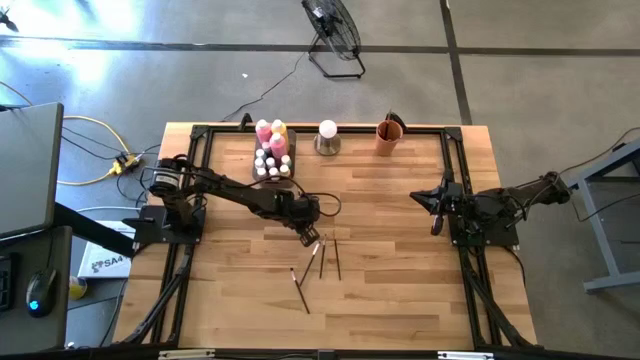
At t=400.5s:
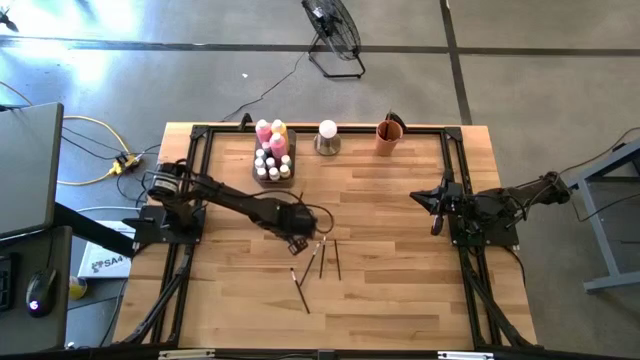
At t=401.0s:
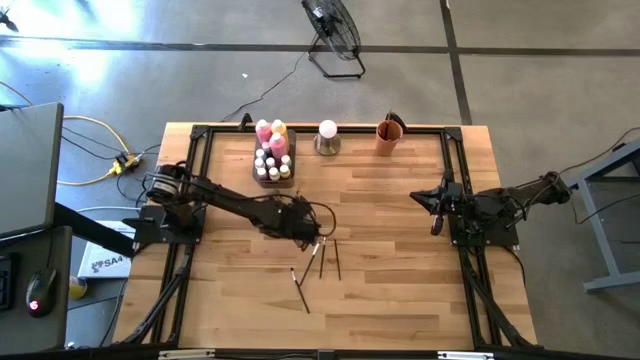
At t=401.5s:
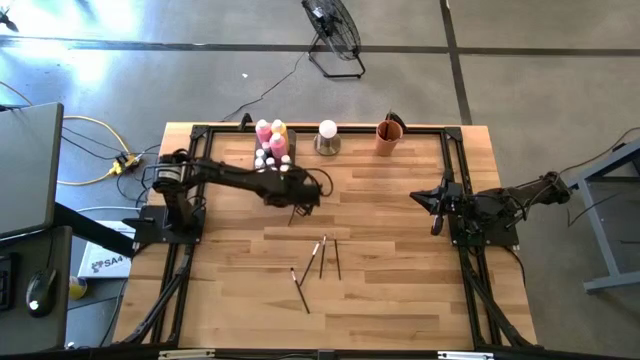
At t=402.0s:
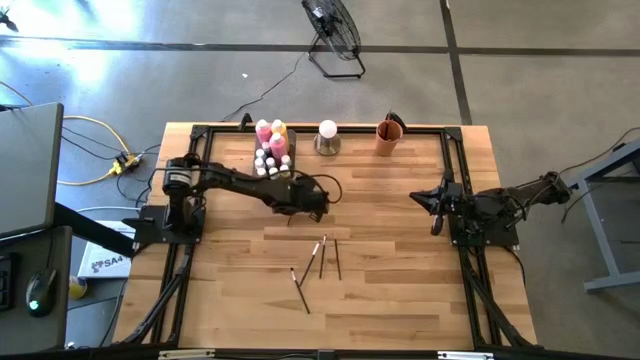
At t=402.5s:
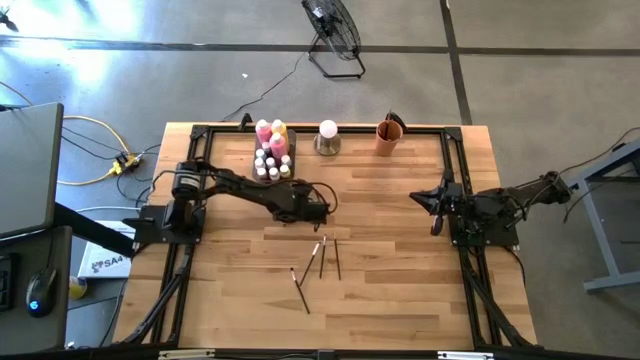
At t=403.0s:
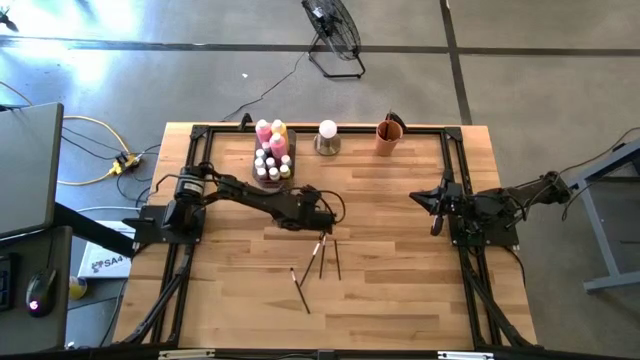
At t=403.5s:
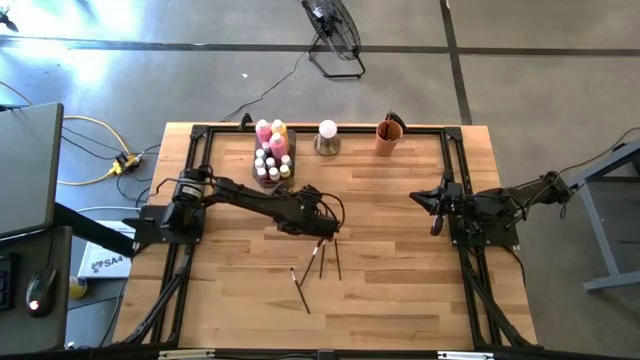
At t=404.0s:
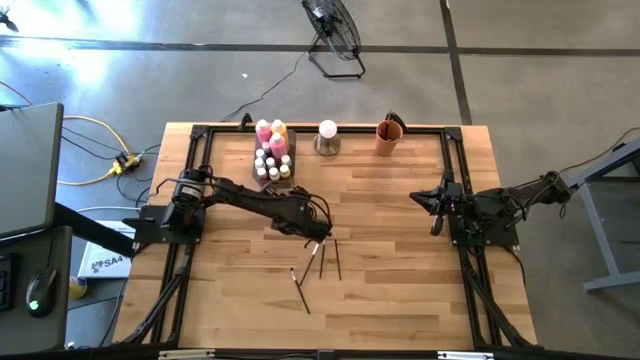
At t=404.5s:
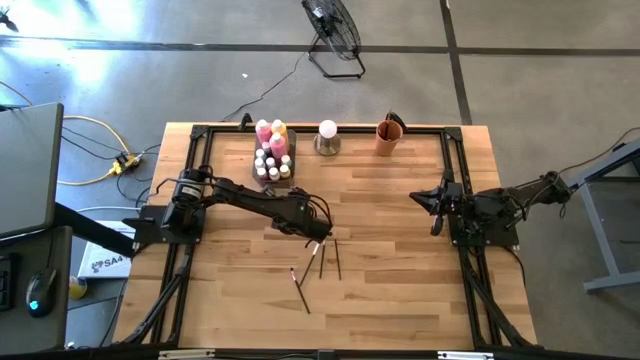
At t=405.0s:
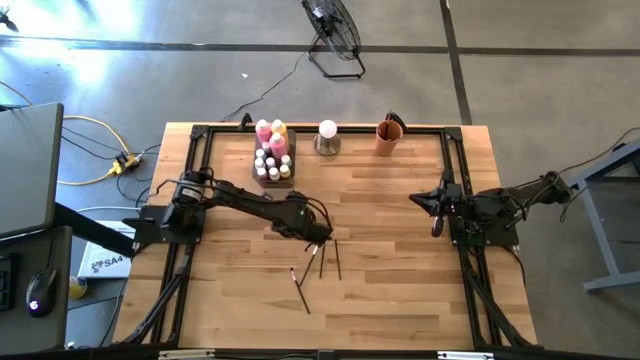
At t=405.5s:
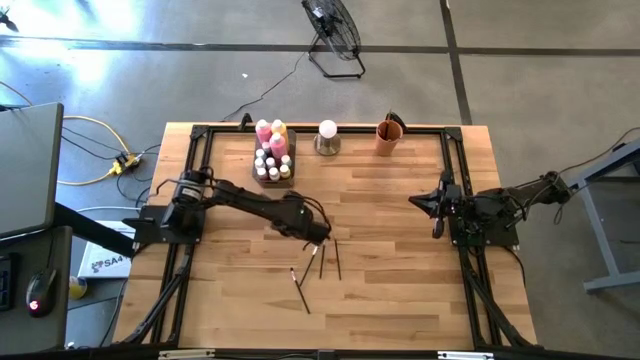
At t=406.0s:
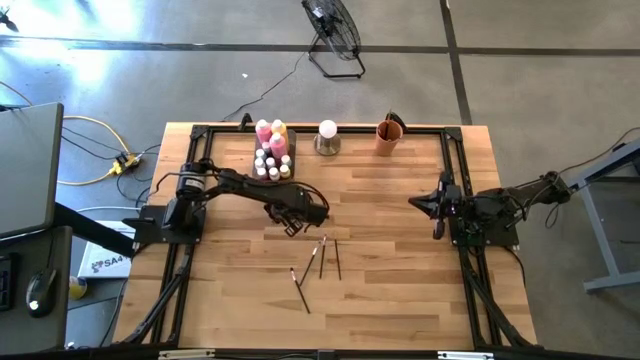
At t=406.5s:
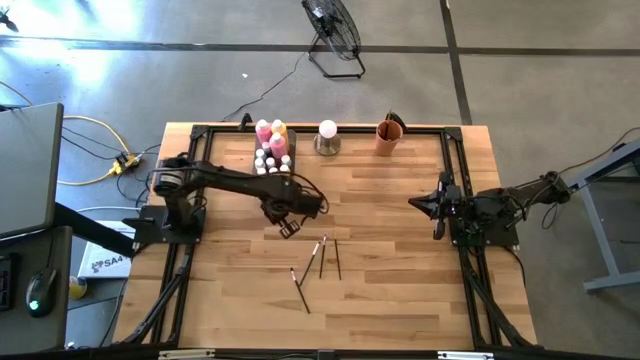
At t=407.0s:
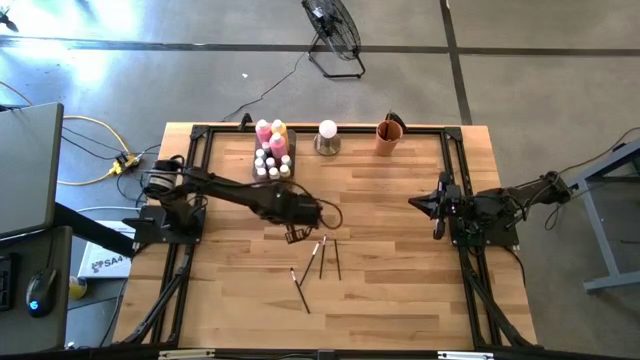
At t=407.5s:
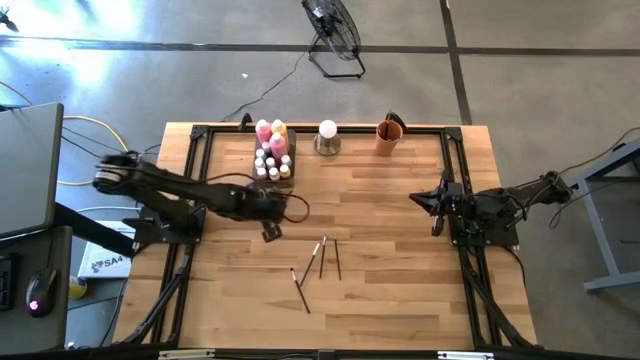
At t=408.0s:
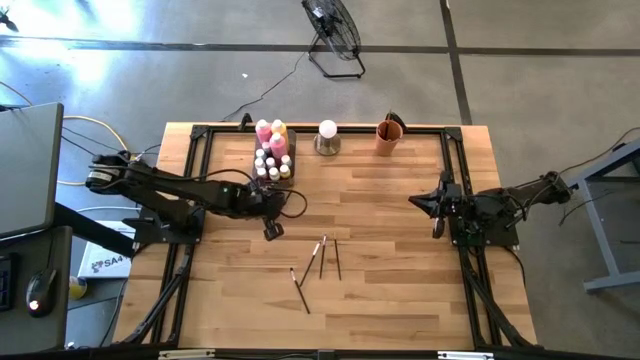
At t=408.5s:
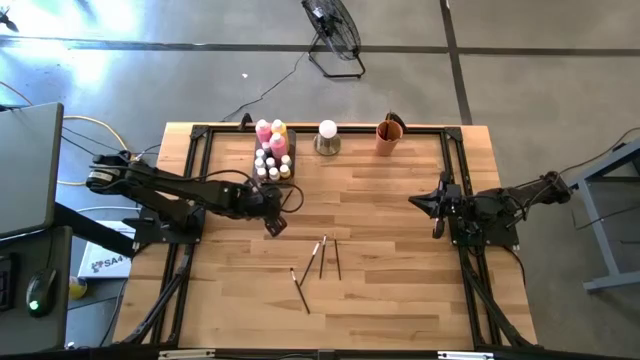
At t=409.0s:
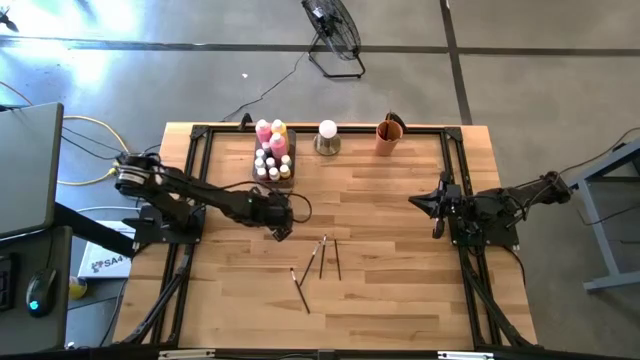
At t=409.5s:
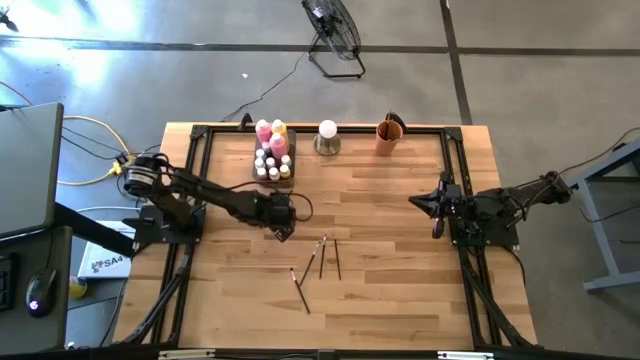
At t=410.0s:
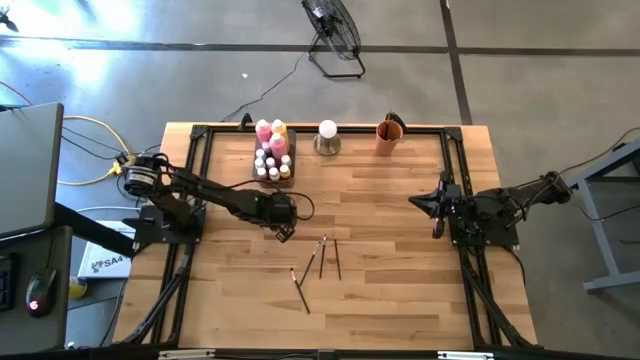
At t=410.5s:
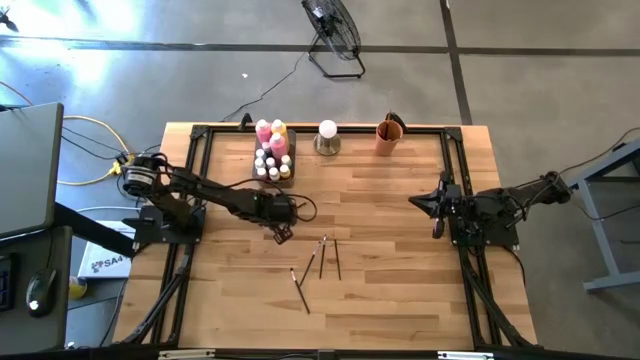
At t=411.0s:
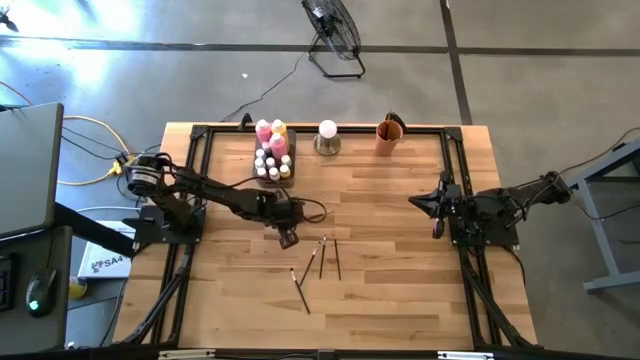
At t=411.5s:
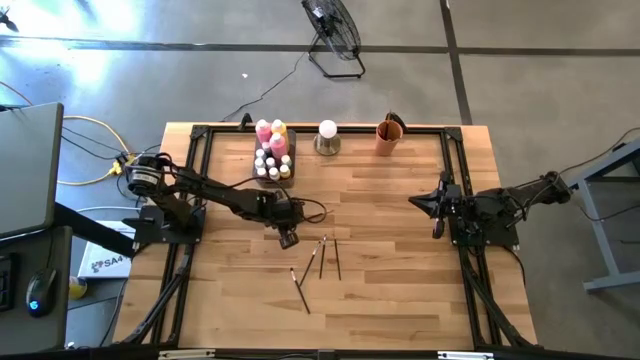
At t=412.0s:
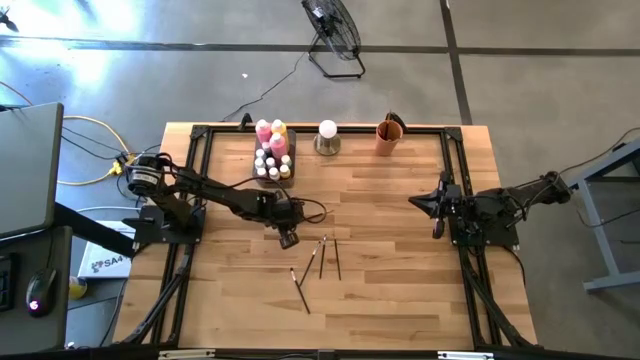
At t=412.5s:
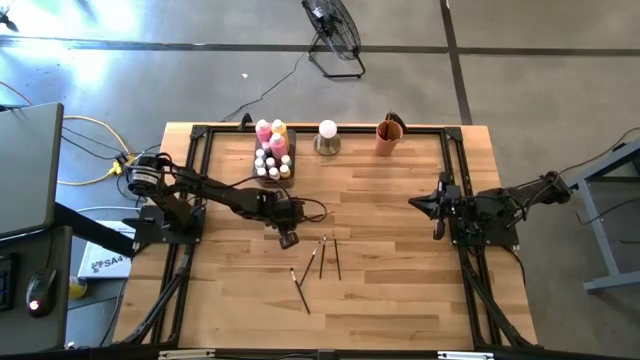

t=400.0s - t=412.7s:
Task: Pick & Place Paint Supplies
Put the orange paintbrush into the orange cup

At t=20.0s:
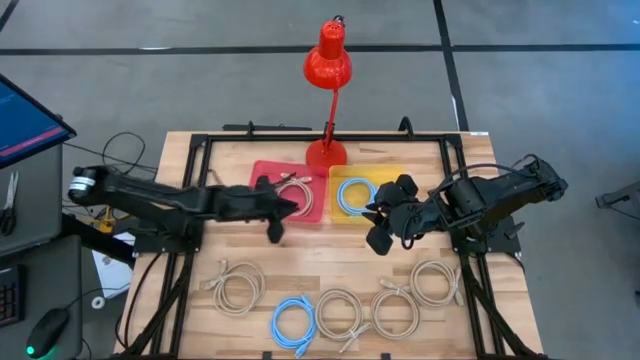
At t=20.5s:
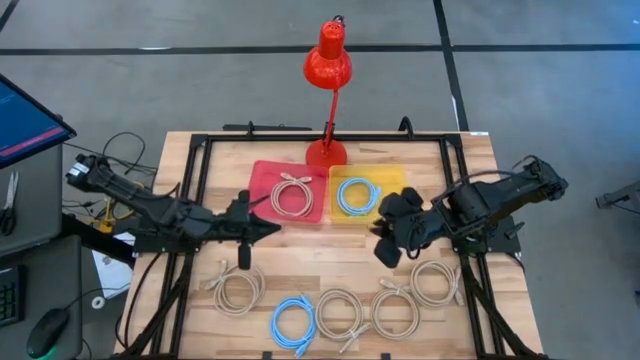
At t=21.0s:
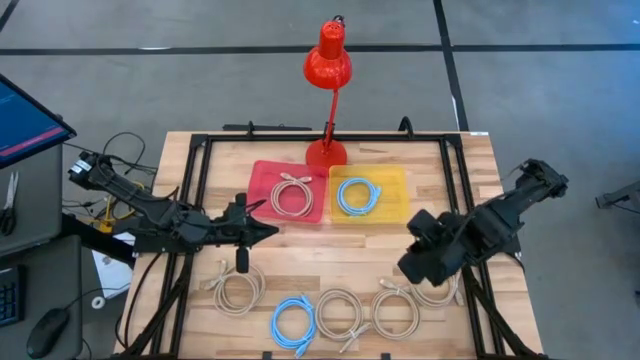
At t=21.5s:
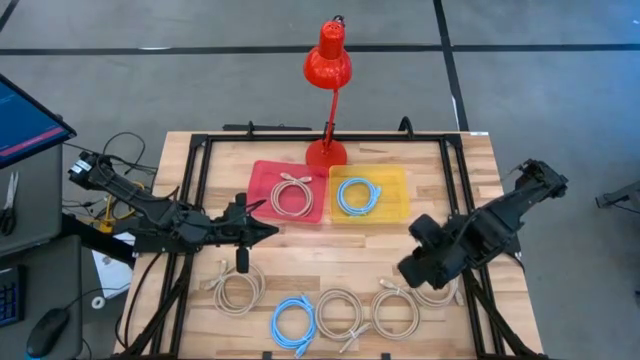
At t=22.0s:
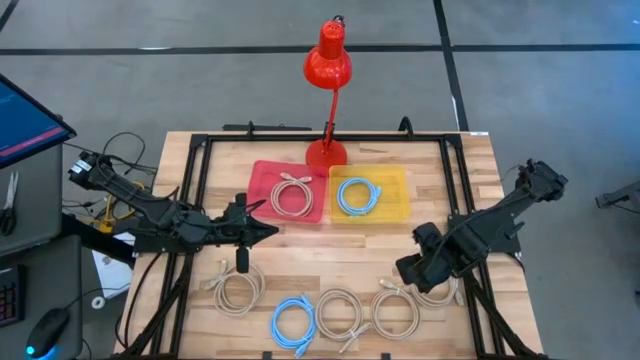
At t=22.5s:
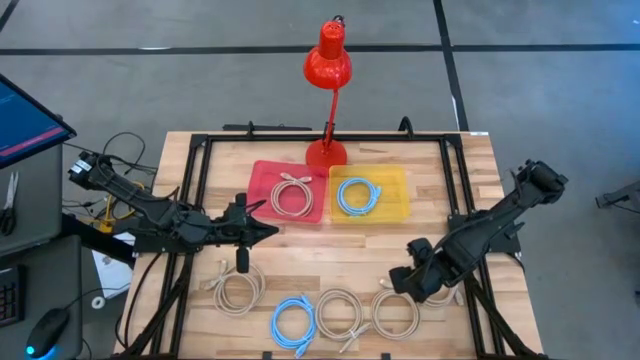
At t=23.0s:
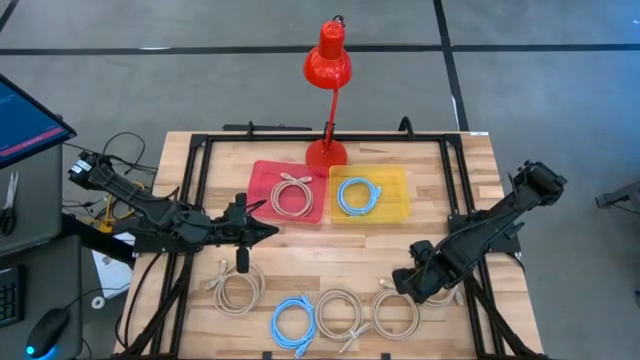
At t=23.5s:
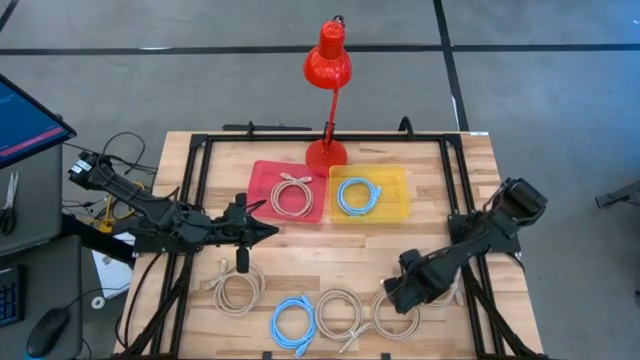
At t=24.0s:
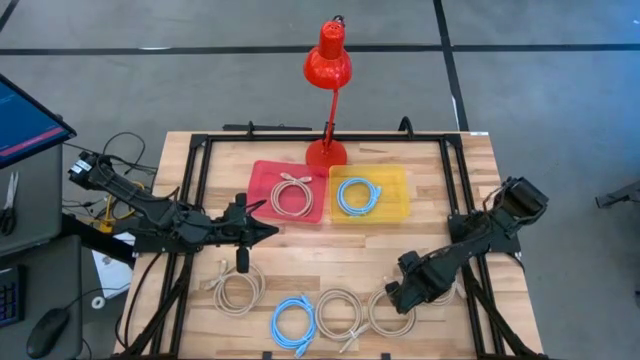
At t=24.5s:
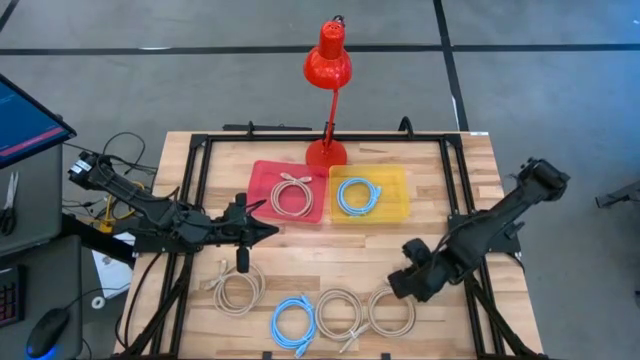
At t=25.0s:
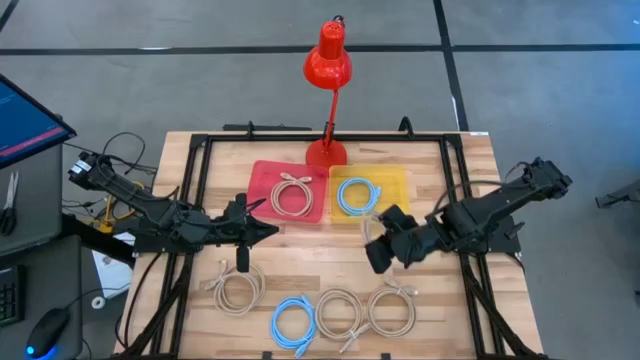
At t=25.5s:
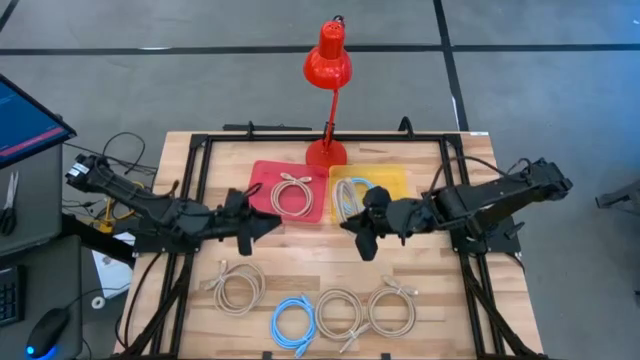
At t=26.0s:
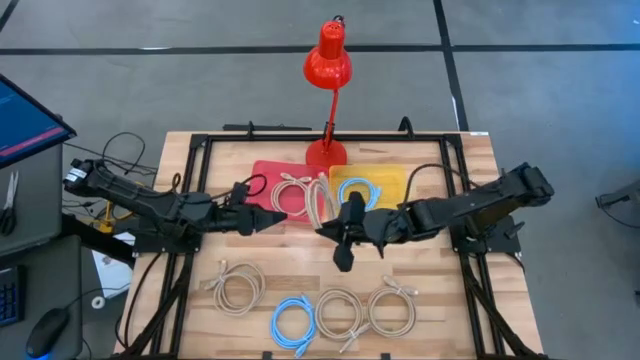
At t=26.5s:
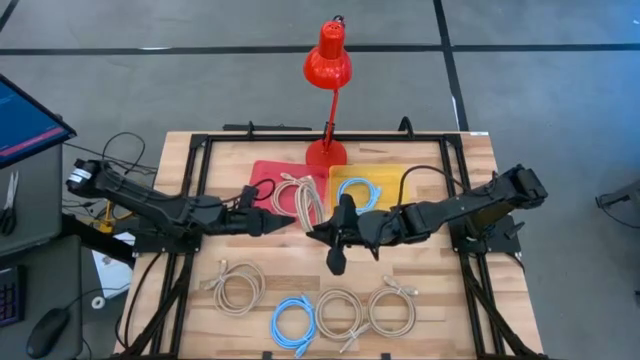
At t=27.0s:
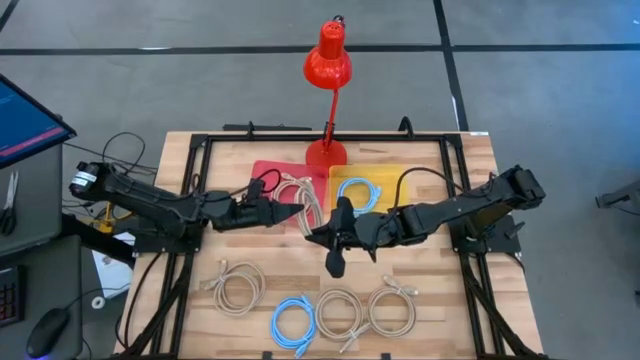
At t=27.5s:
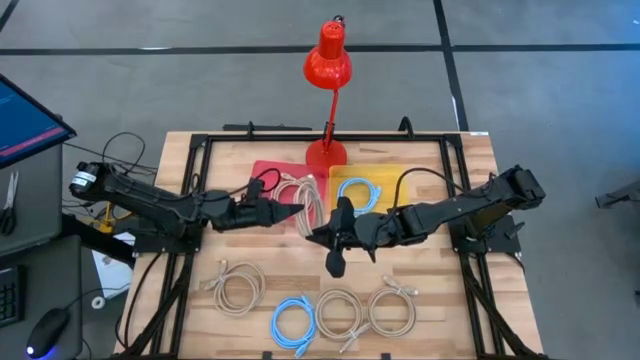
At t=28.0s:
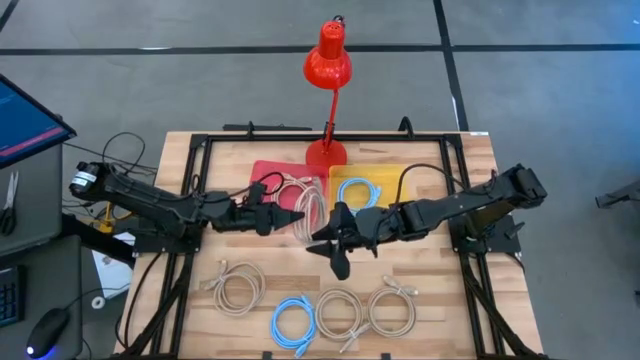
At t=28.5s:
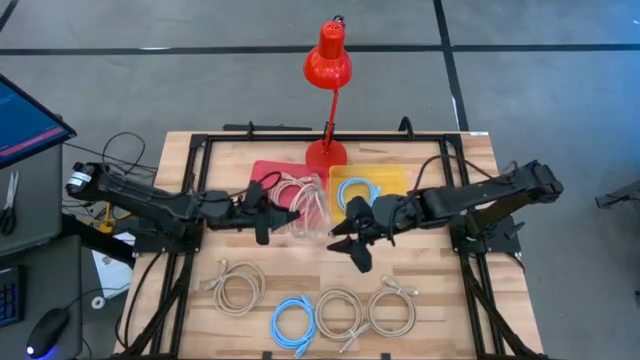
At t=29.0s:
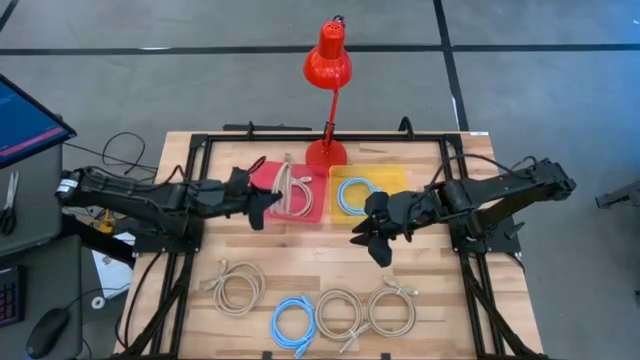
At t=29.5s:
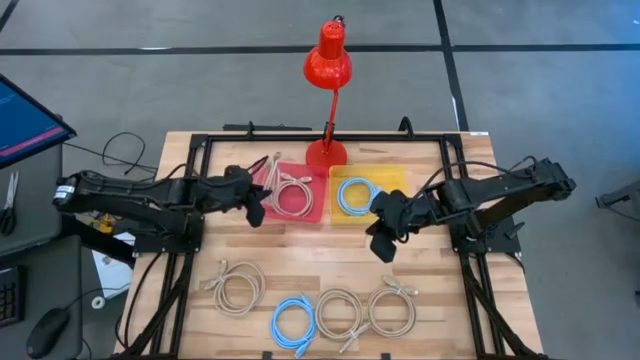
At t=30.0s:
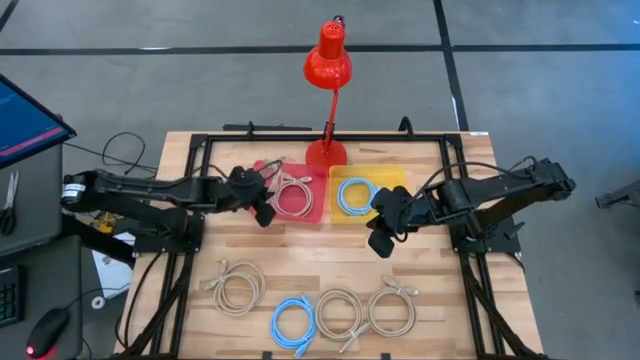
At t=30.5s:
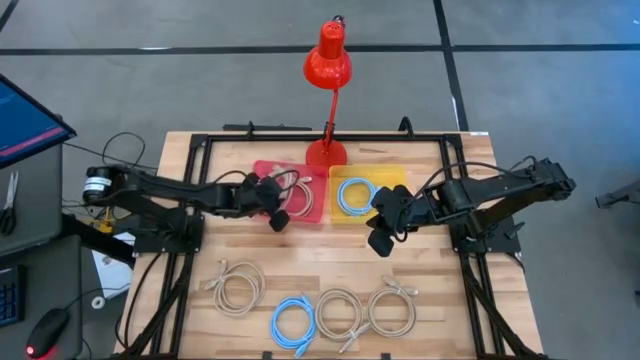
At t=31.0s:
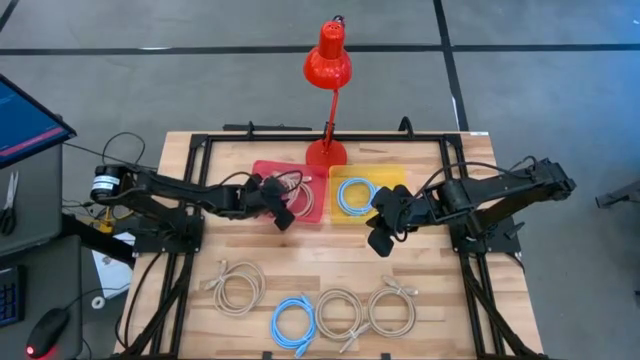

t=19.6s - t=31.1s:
Task: Sort HDMI cables
Put the brown HDMI cable into the red bin
